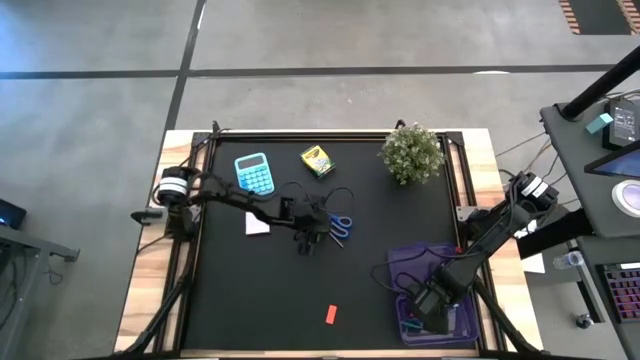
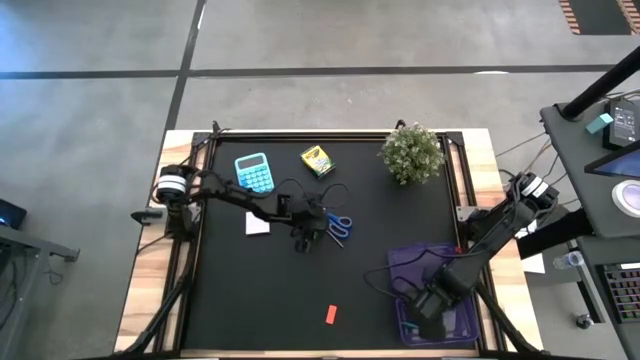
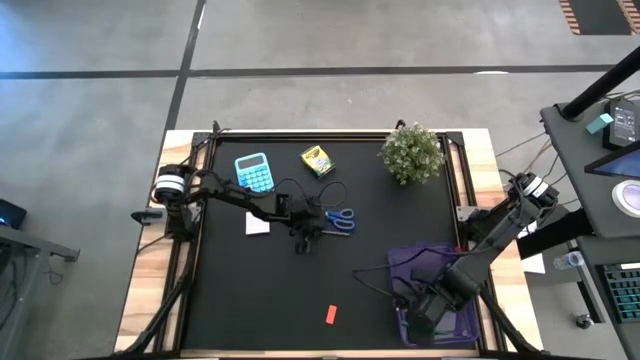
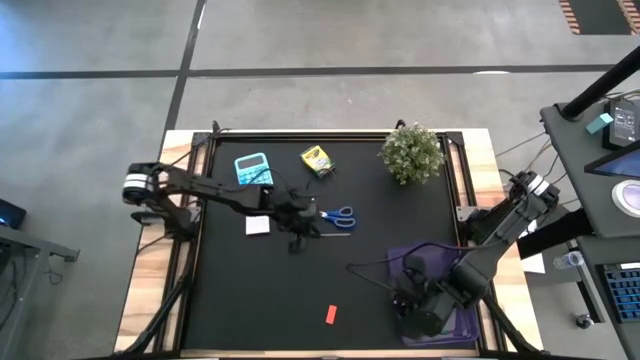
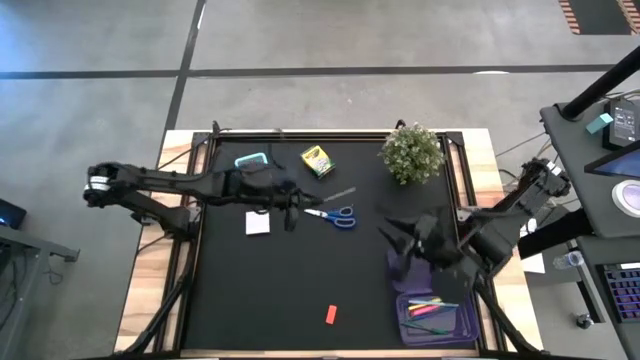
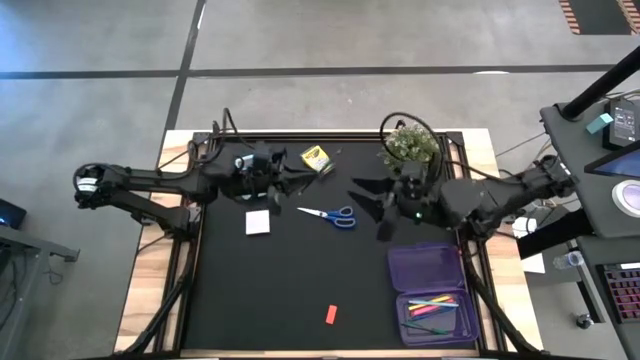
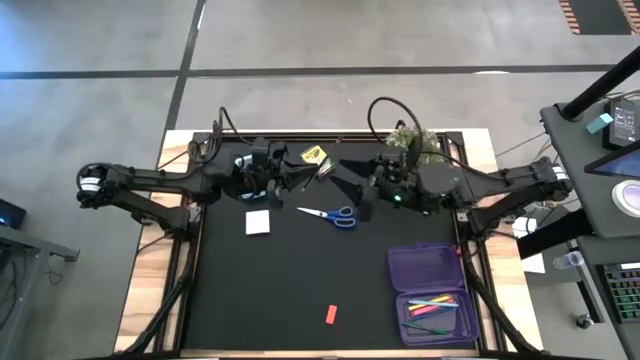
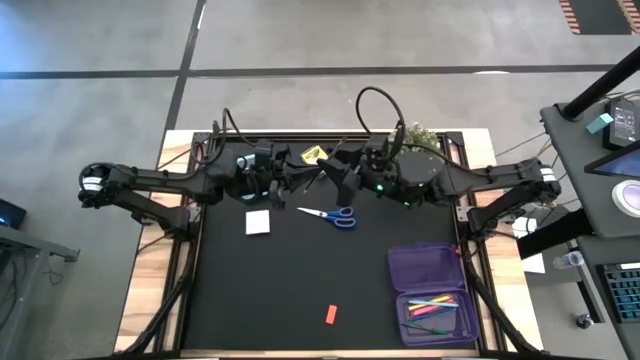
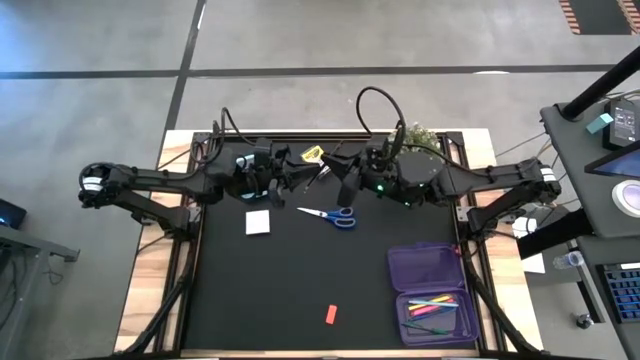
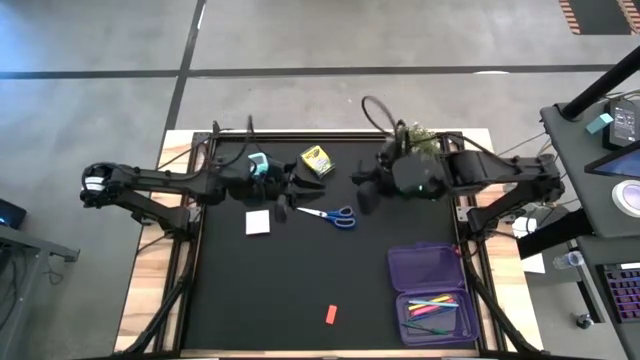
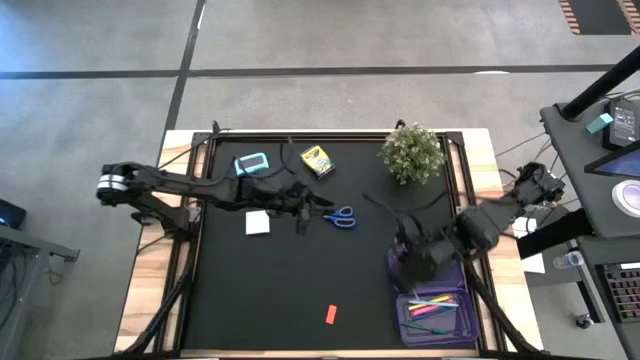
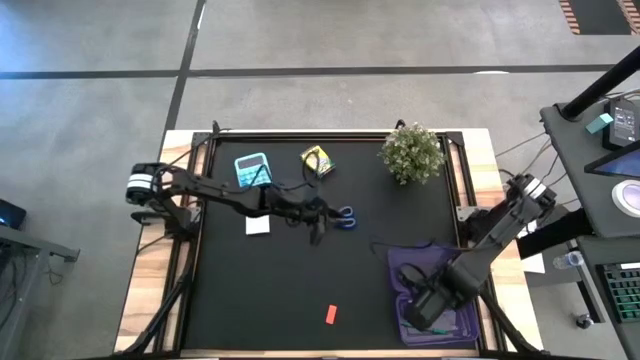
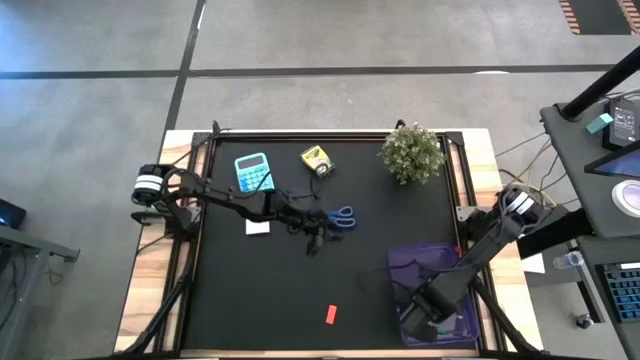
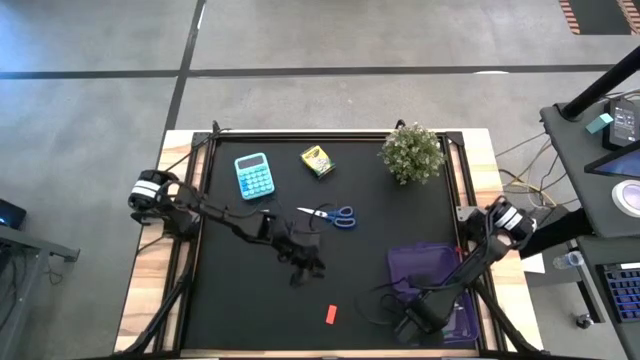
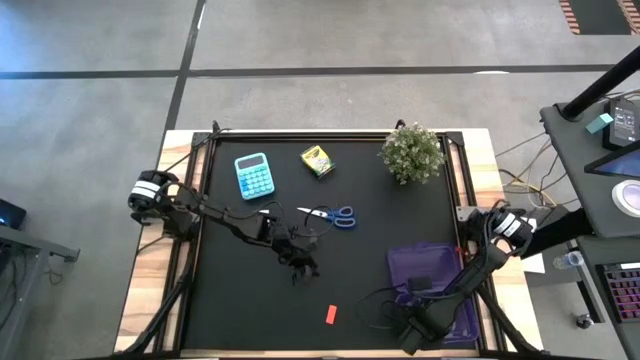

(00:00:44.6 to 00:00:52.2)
Task: Pack school essentials
Put the pencil into the supply box

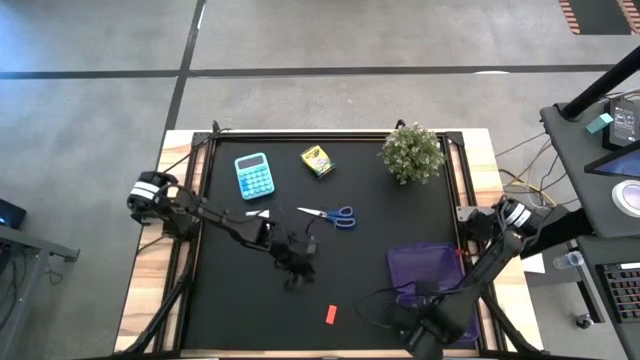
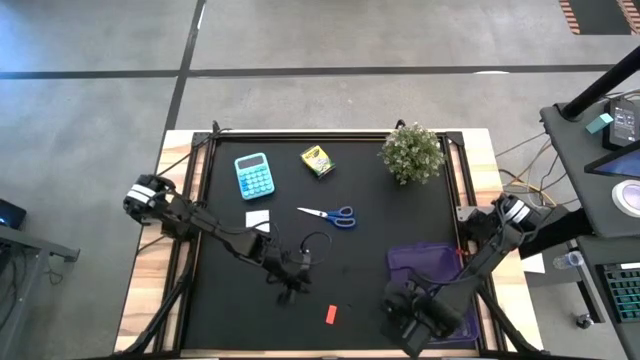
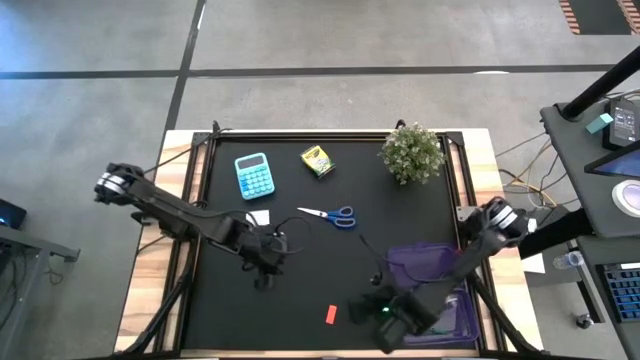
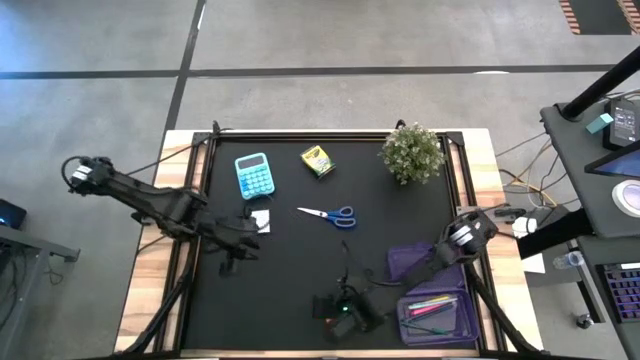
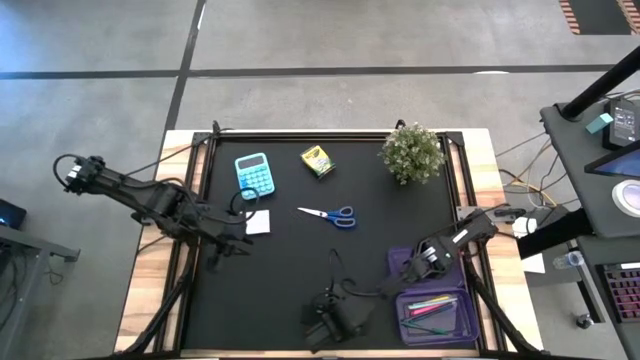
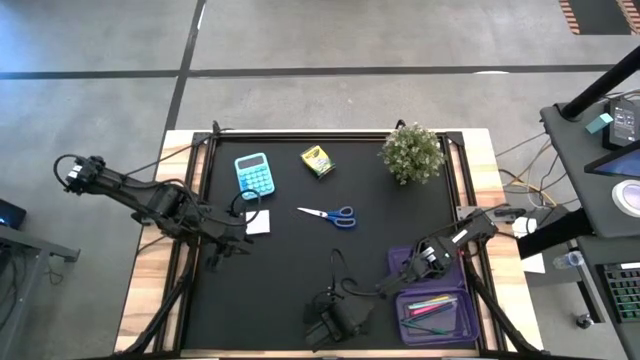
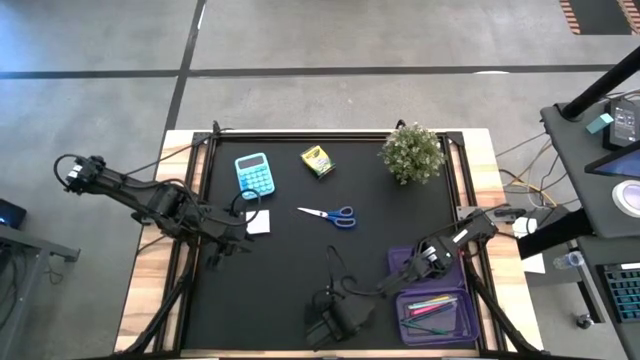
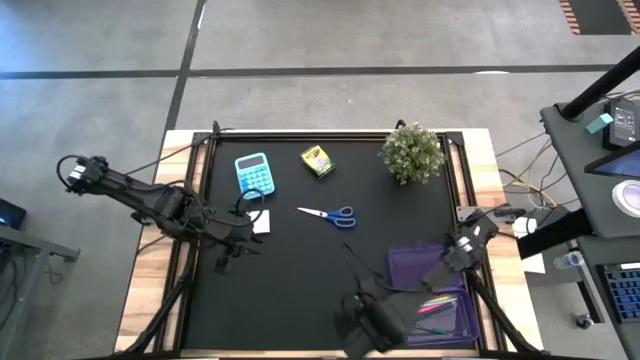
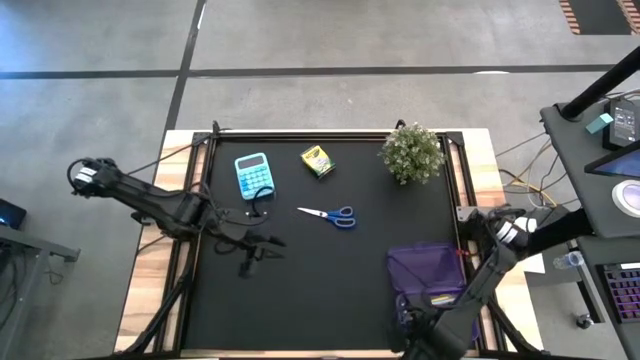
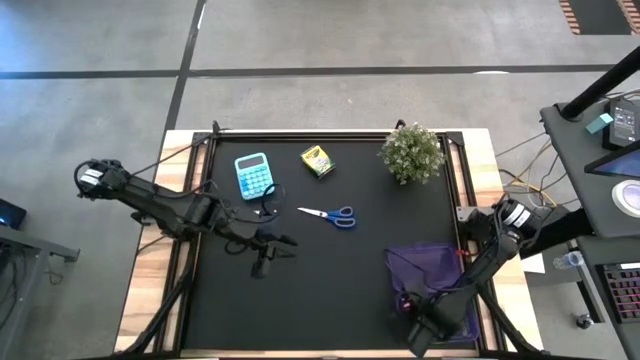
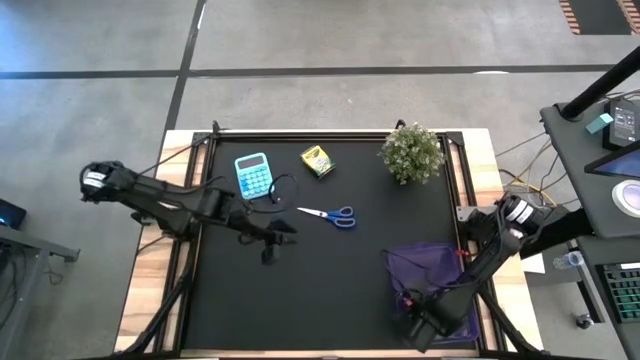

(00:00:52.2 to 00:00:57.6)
Put the orange eraser into the supply box

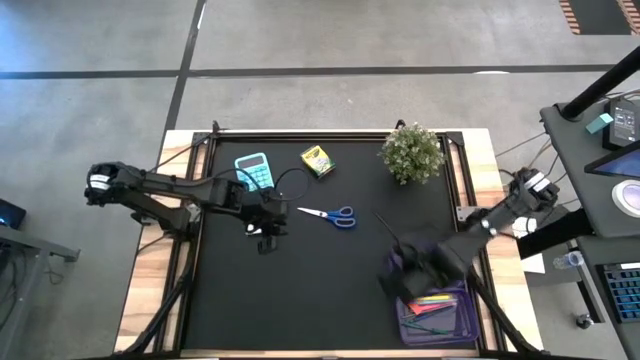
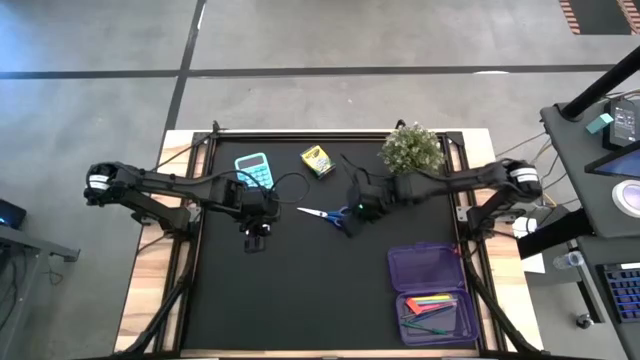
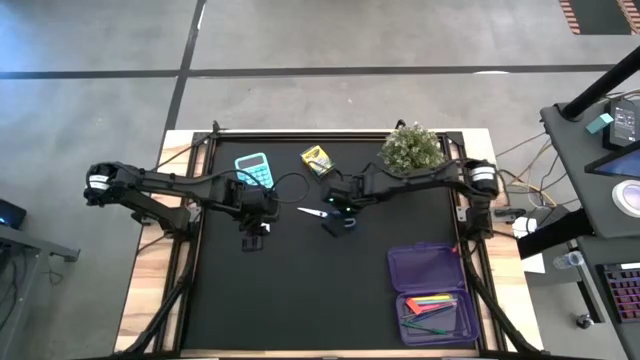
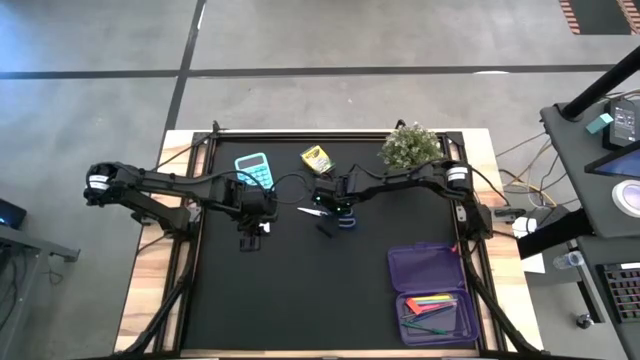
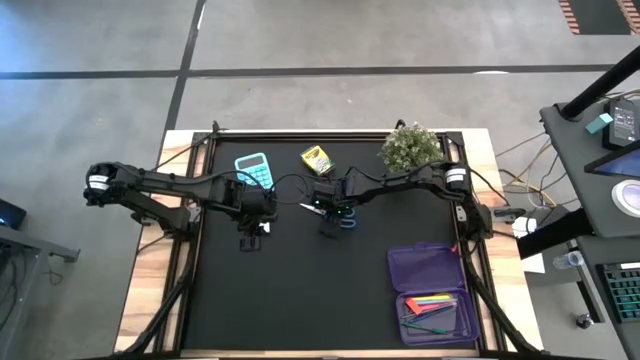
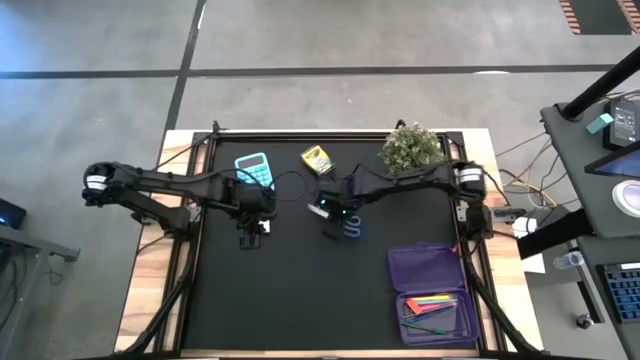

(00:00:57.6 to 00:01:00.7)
Put the scissors into the supply box

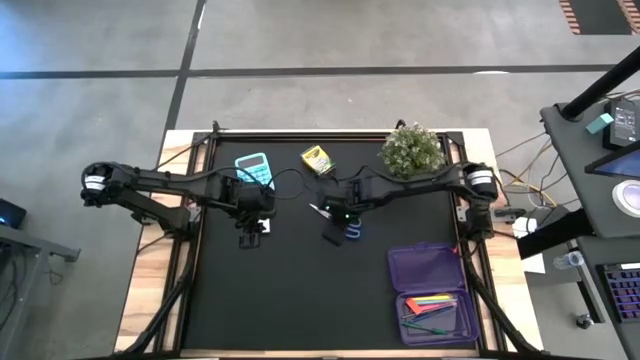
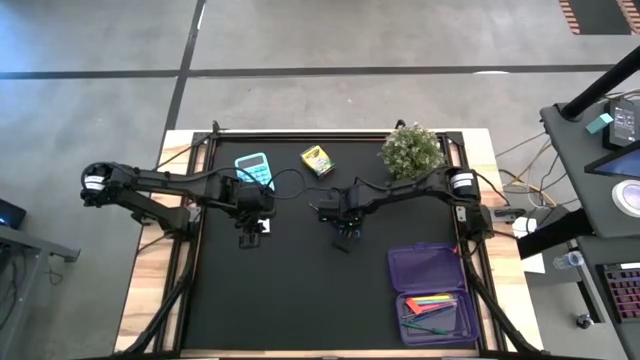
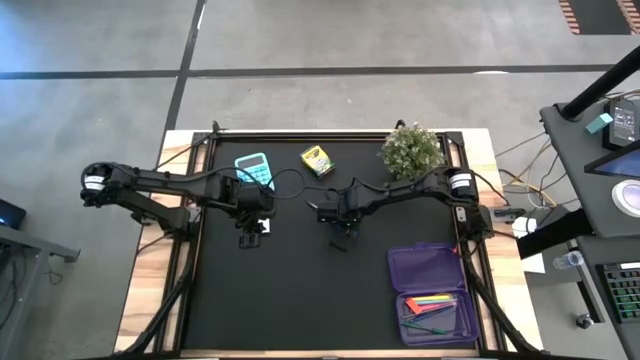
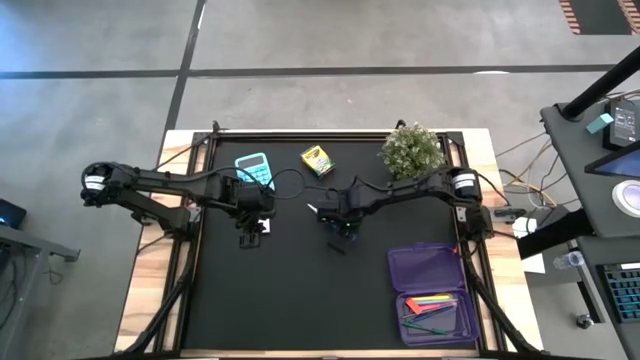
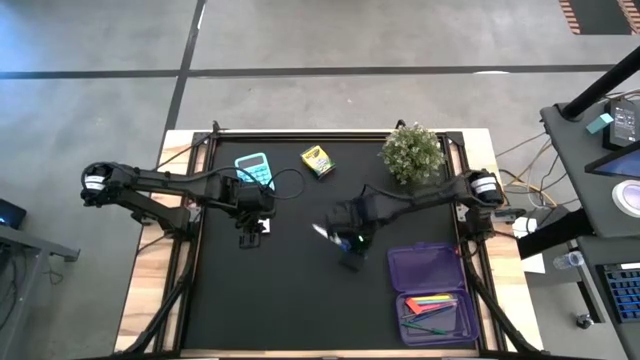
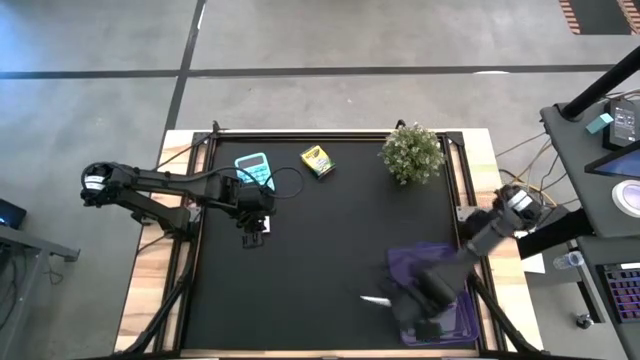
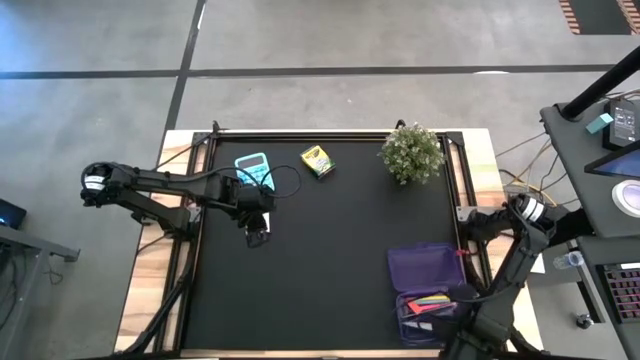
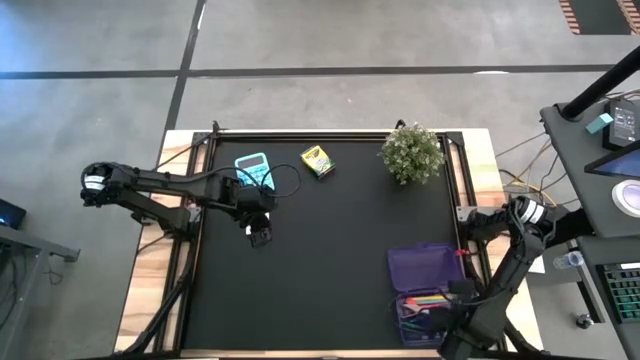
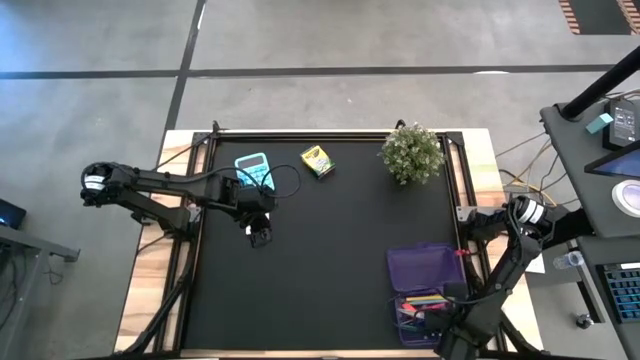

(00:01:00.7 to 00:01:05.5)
Put the scissors into the supply box
